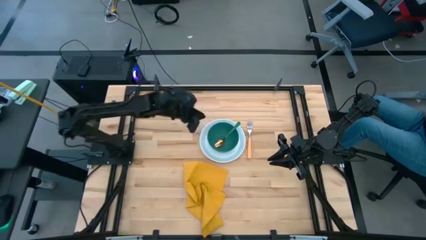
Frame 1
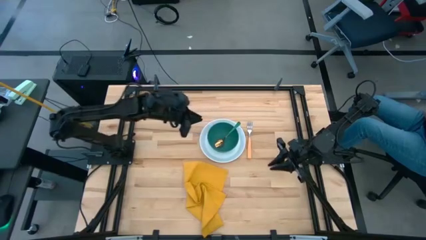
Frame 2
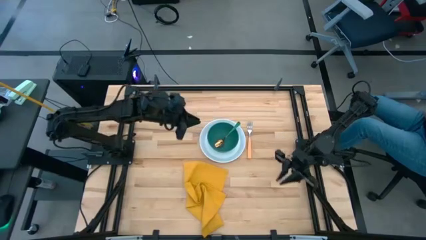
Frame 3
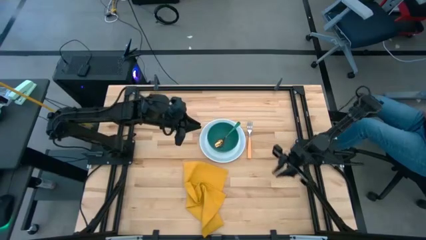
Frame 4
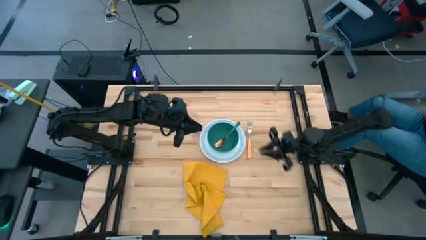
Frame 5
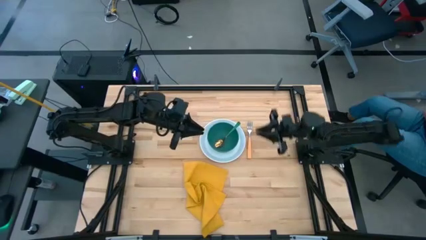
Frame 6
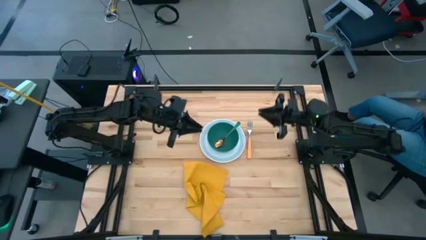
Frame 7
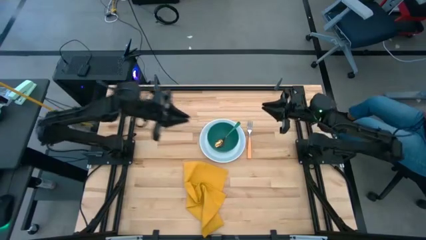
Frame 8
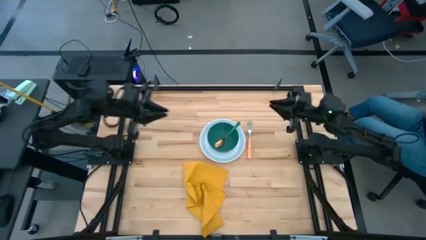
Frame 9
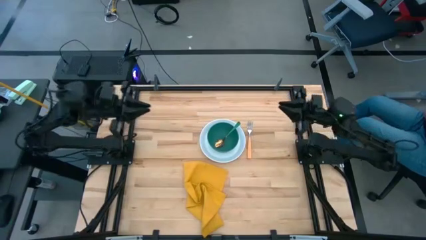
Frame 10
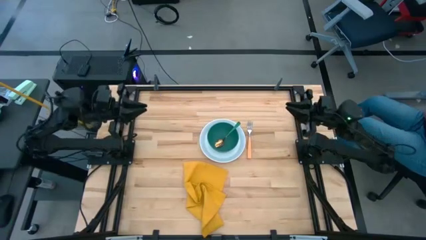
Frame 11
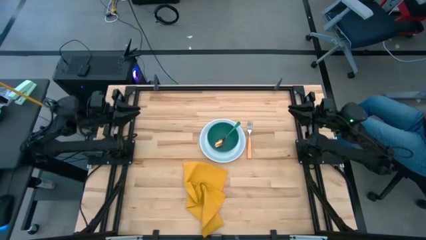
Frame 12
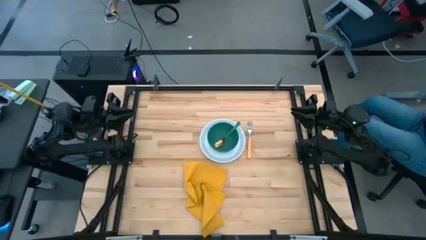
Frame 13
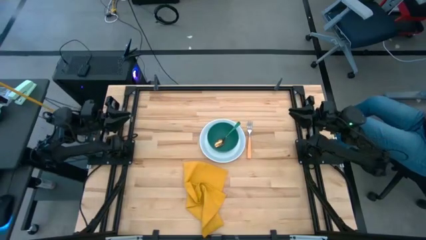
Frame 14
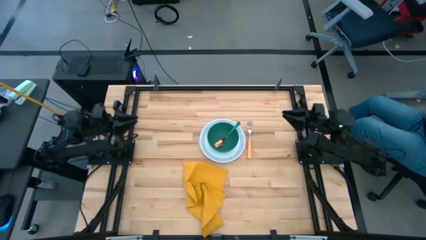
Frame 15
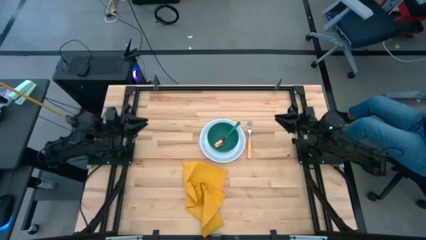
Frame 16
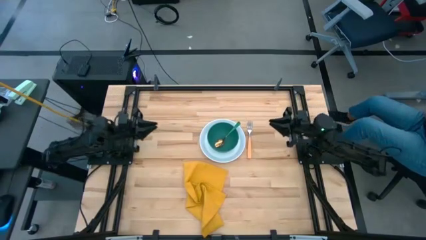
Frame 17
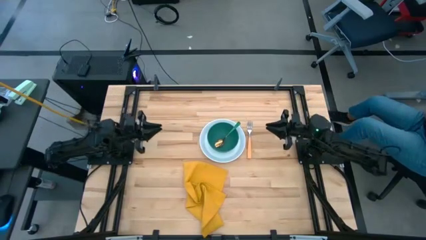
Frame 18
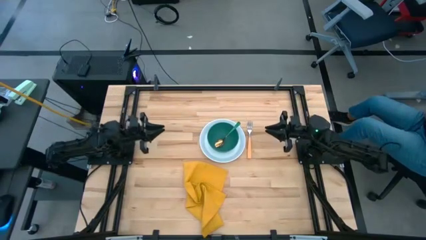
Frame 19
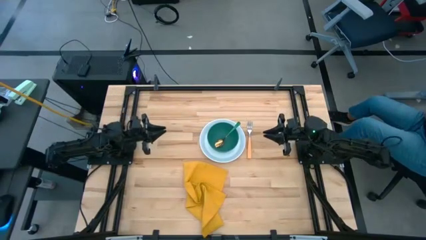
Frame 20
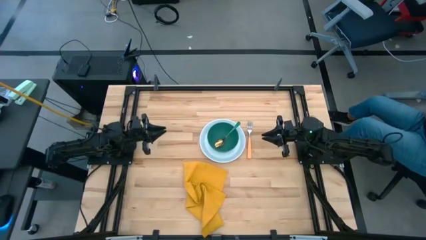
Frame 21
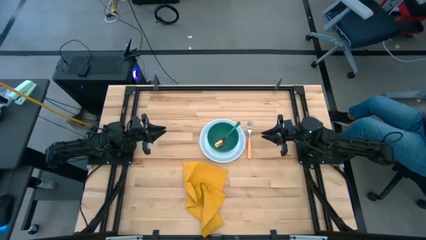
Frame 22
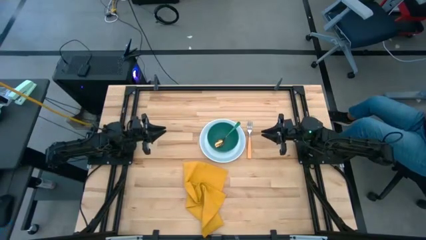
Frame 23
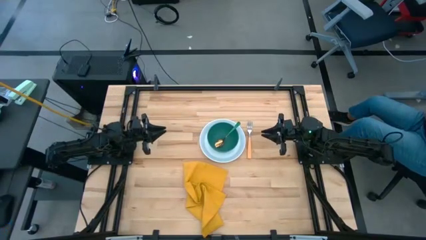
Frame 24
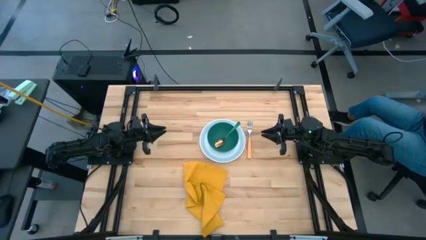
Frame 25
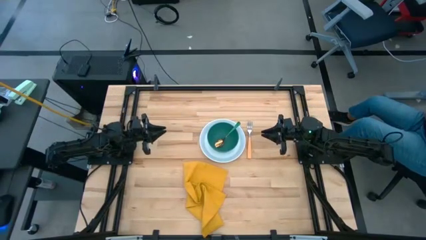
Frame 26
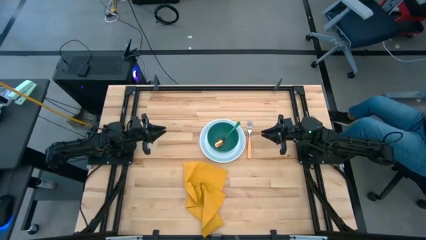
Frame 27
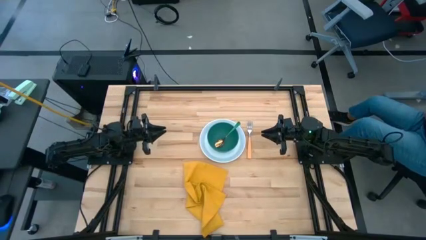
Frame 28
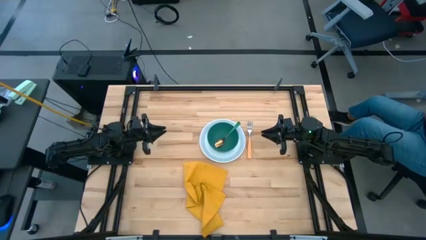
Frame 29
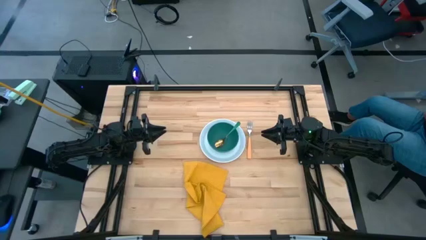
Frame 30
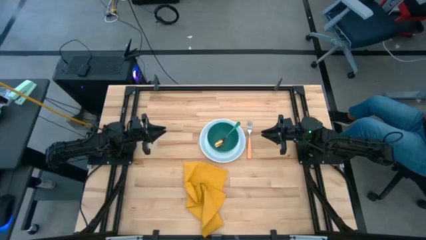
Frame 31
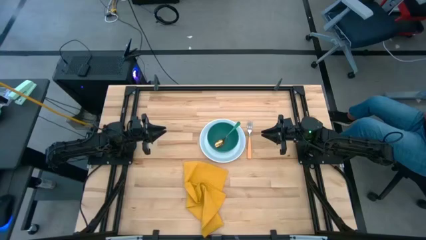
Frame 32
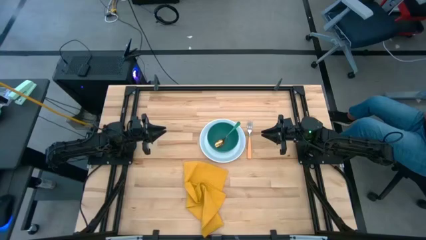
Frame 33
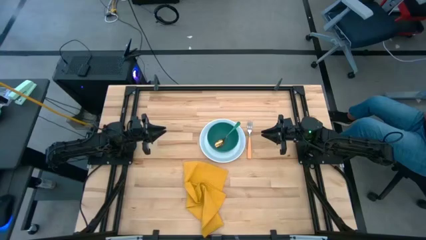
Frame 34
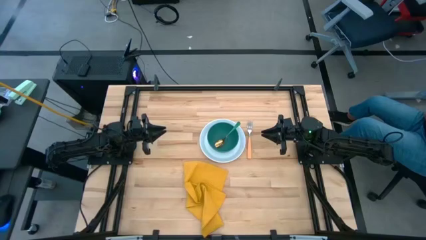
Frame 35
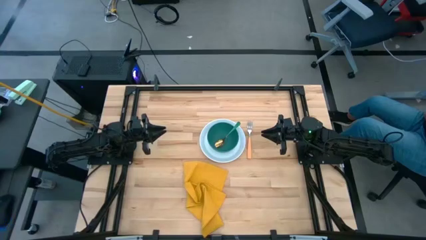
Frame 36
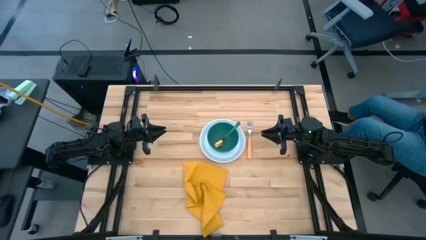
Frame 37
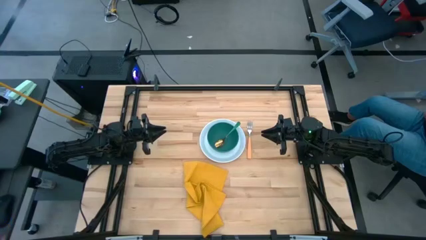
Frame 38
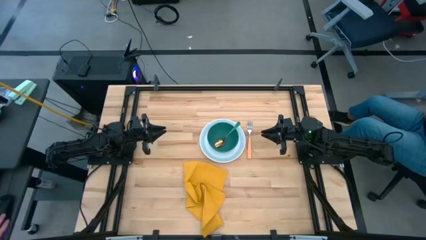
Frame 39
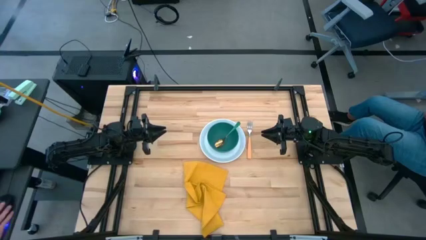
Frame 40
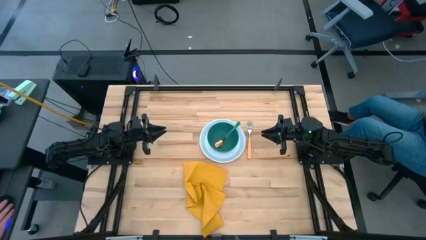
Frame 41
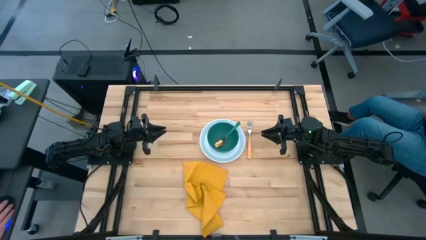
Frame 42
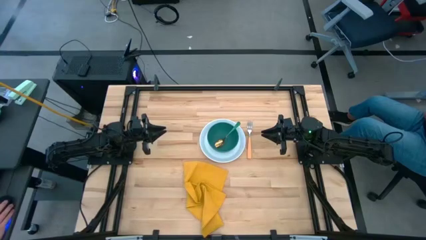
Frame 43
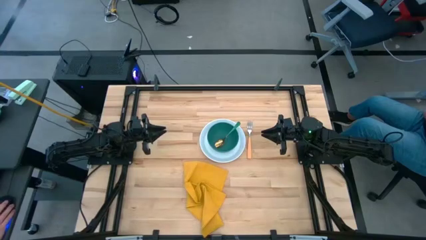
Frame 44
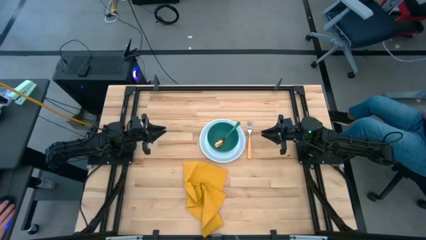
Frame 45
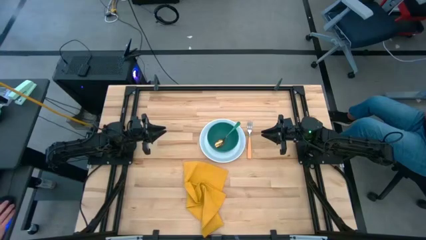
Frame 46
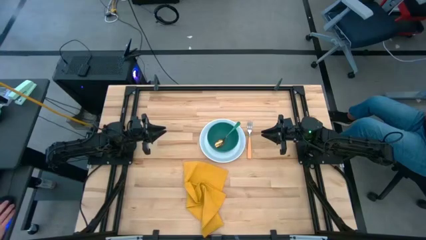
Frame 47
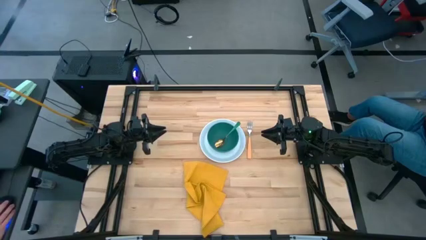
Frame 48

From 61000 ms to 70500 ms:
Task: Set table place
Return to Home Position

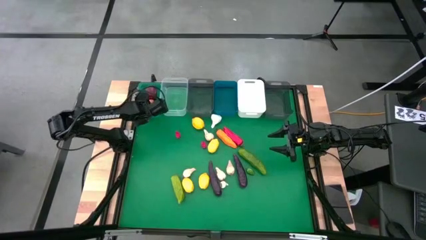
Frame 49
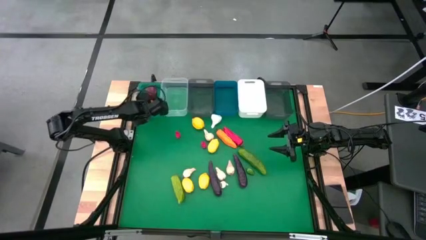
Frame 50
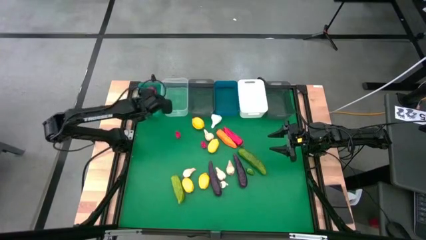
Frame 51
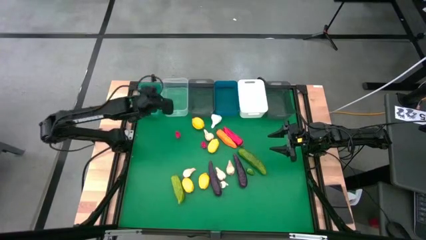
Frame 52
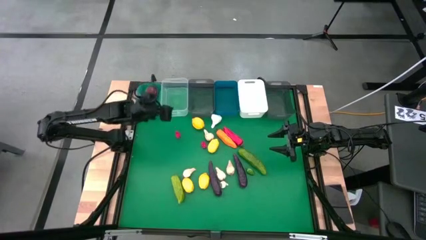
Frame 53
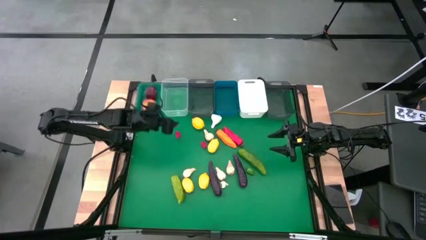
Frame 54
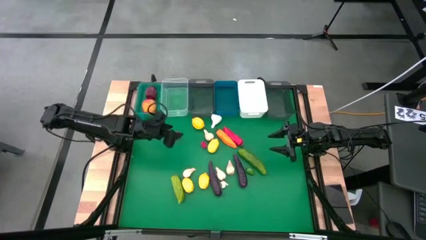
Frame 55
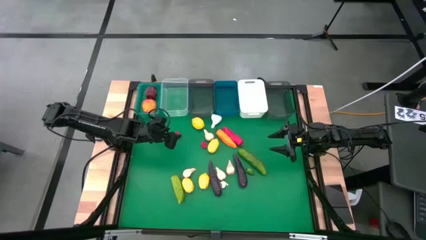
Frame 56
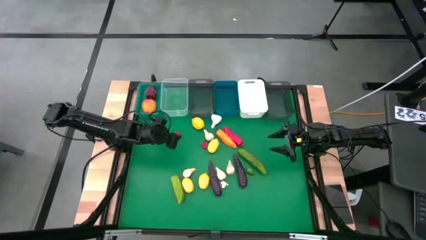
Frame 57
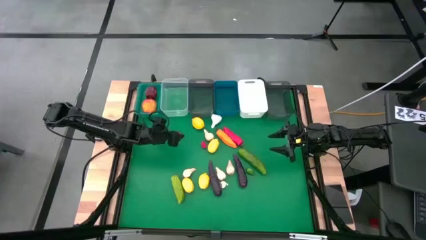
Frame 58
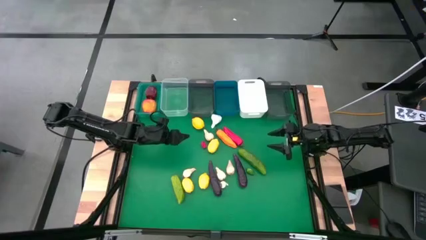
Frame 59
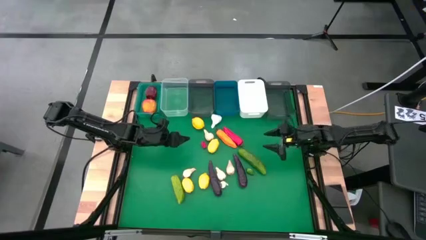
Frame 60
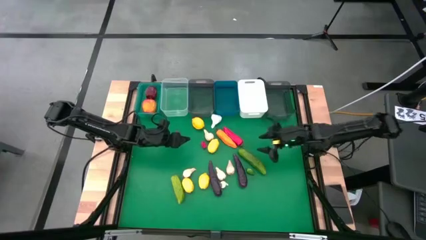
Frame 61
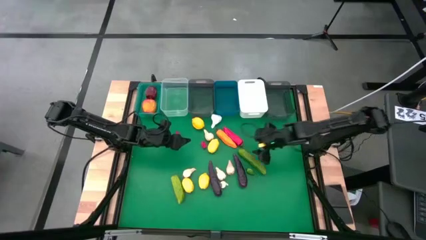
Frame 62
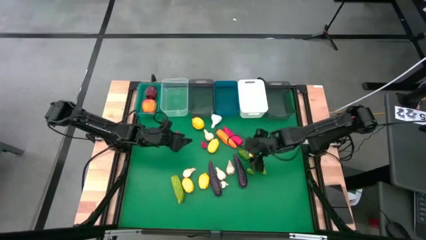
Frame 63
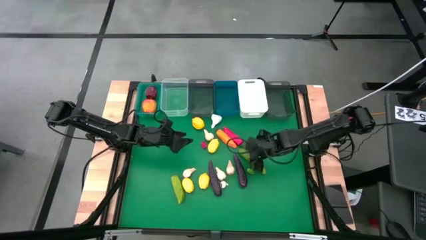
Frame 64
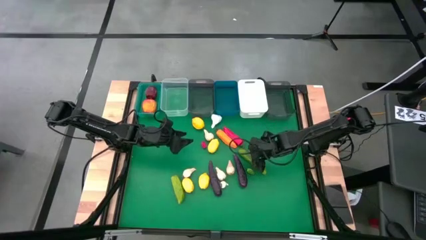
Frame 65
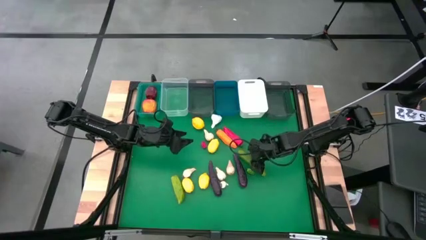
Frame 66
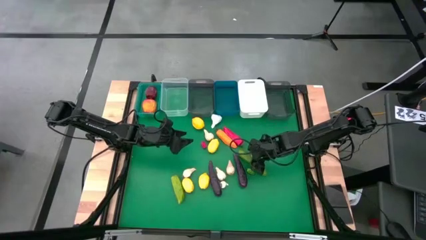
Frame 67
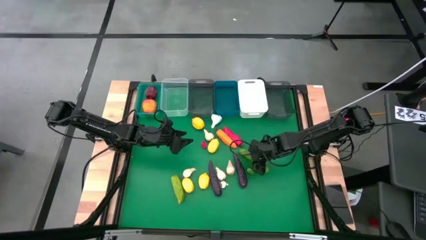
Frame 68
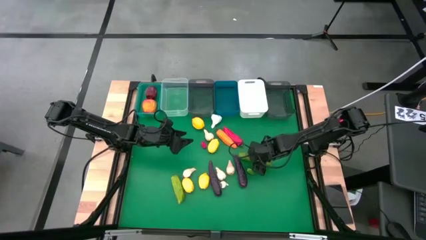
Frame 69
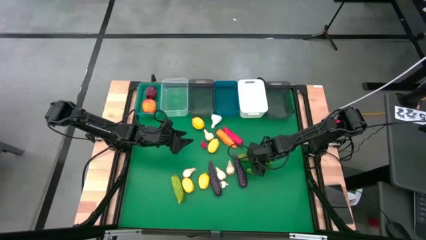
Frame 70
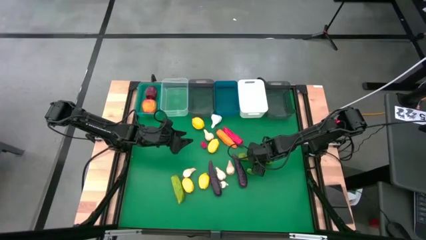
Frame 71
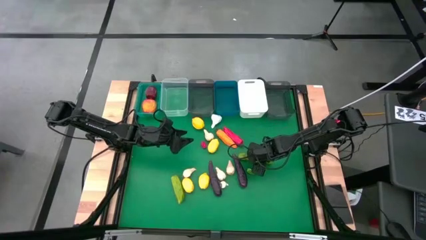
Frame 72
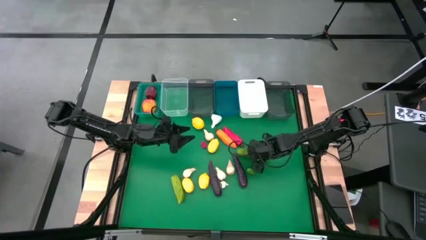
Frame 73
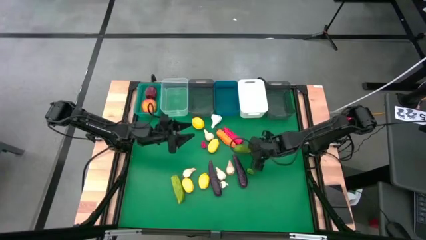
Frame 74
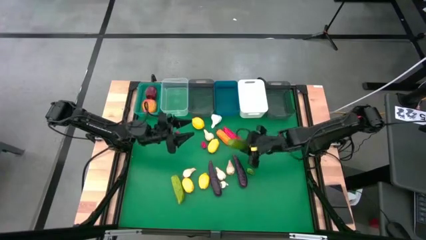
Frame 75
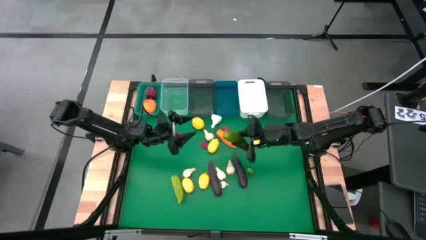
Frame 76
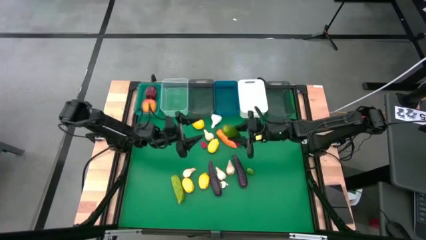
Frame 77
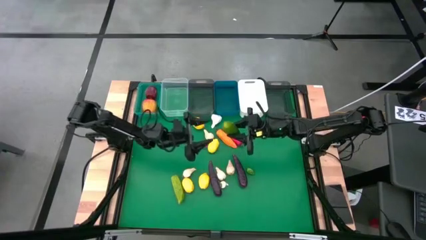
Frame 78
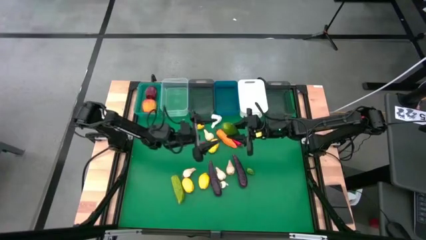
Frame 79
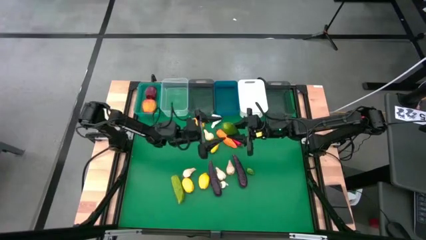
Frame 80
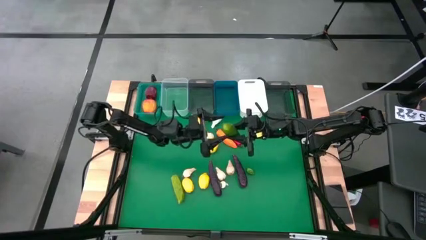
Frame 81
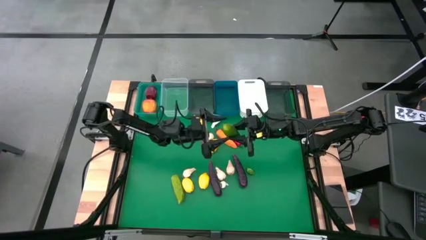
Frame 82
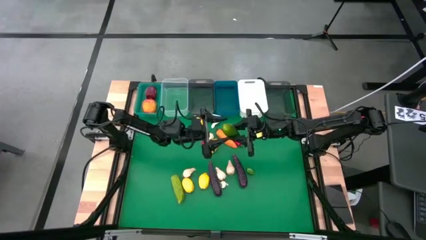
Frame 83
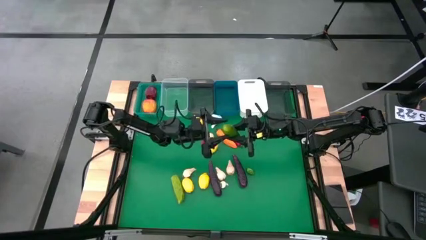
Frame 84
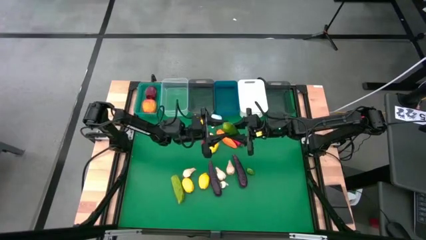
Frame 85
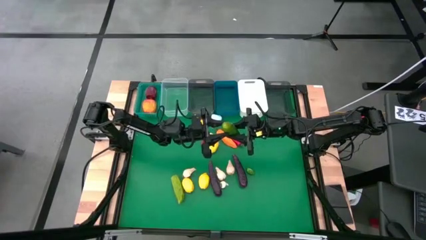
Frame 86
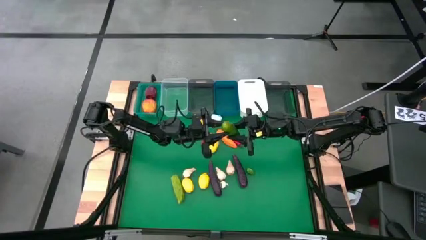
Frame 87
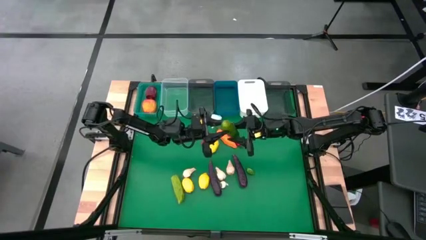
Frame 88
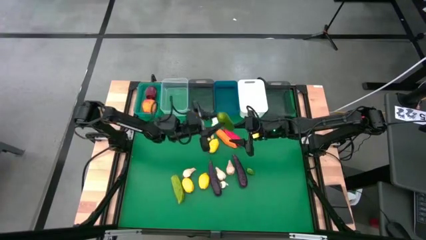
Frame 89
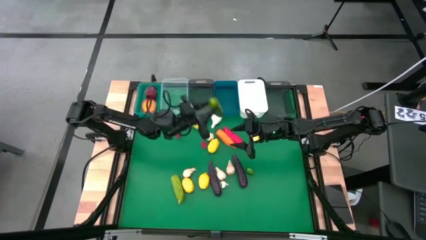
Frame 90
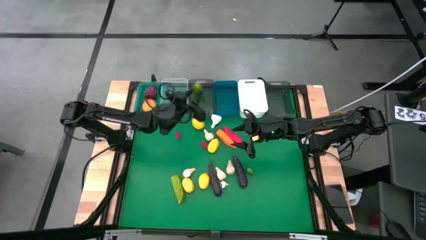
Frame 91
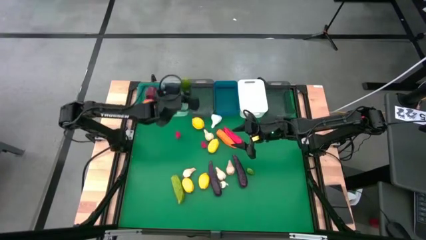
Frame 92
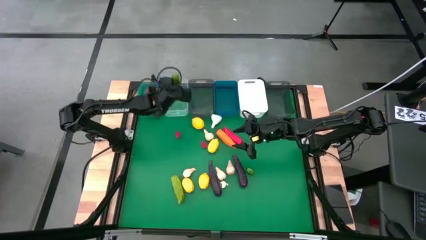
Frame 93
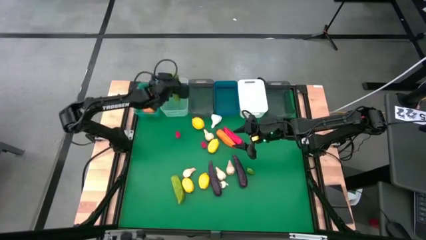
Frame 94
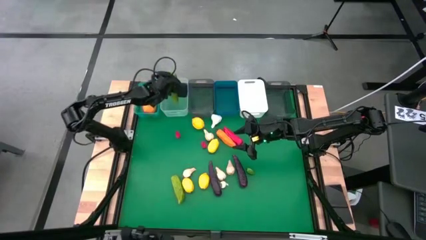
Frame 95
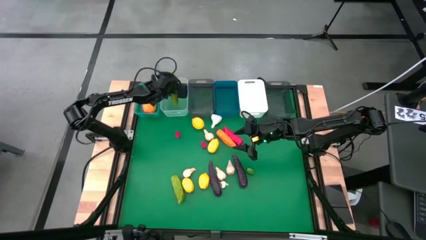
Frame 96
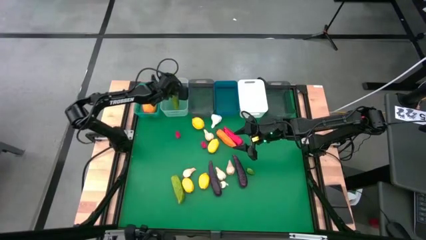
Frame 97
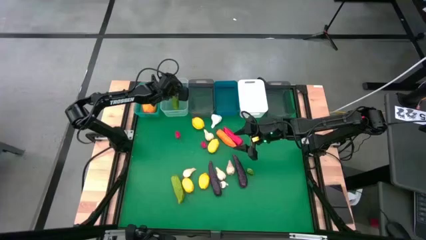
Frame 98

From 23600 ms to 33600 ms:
Task: Sort produce into baskets
Put the cucumber into the transparent bin
